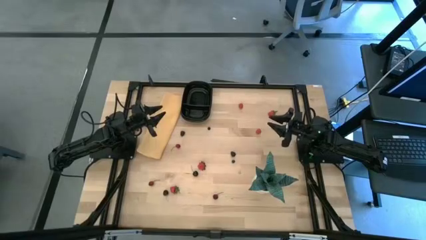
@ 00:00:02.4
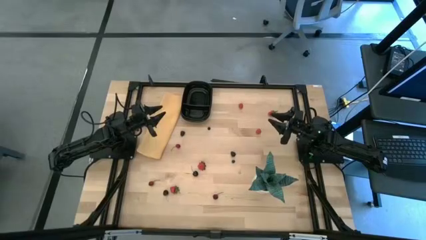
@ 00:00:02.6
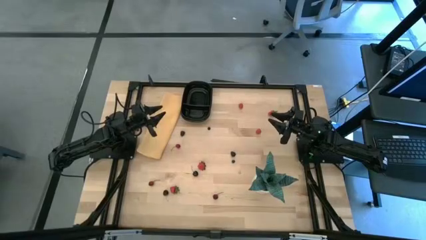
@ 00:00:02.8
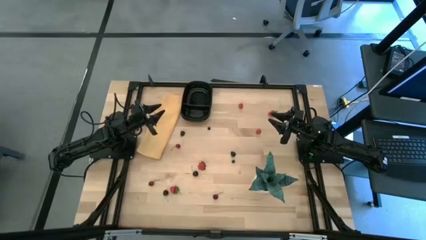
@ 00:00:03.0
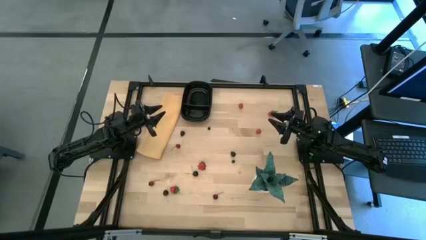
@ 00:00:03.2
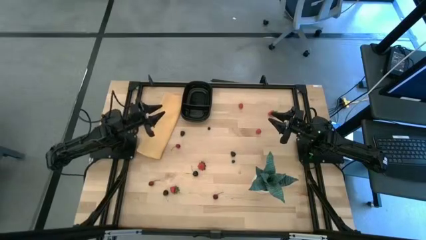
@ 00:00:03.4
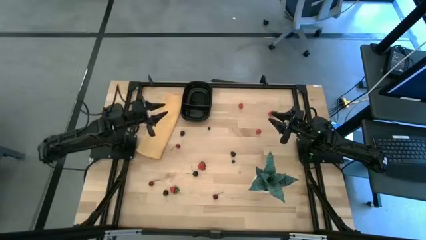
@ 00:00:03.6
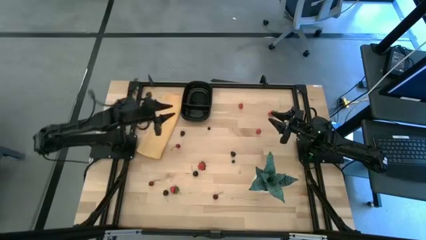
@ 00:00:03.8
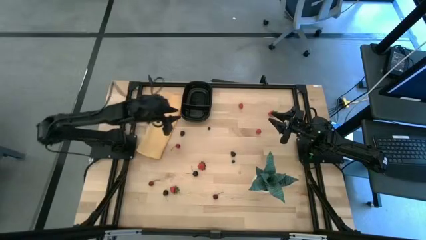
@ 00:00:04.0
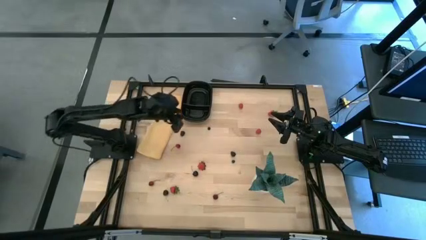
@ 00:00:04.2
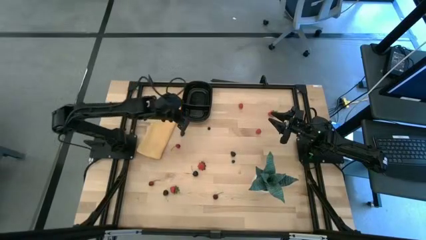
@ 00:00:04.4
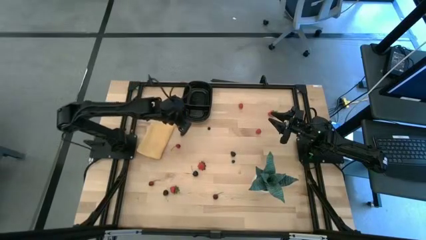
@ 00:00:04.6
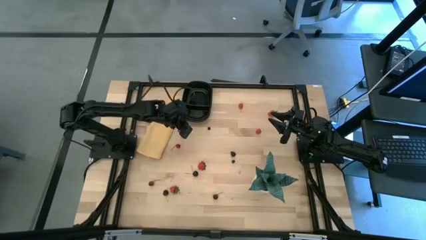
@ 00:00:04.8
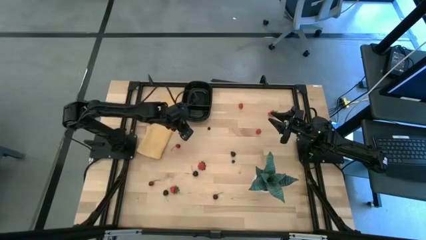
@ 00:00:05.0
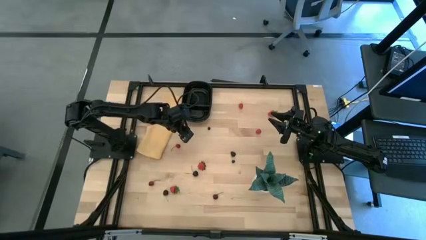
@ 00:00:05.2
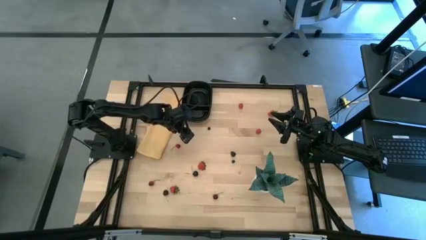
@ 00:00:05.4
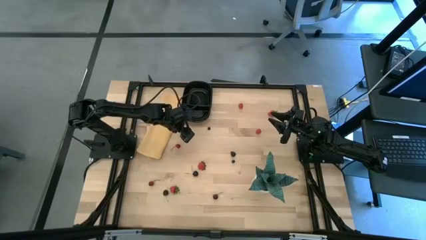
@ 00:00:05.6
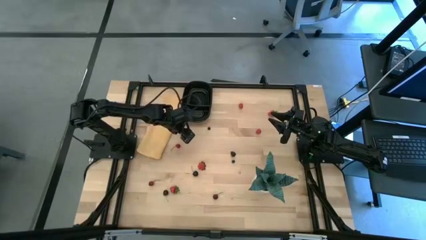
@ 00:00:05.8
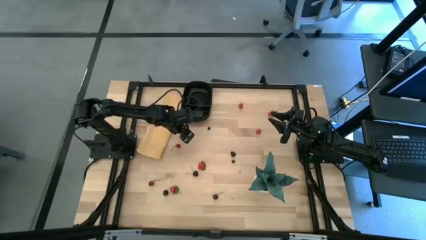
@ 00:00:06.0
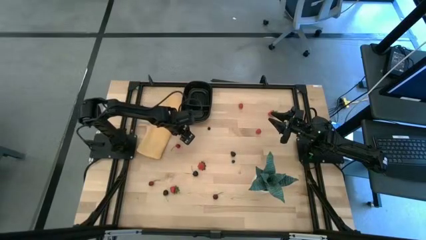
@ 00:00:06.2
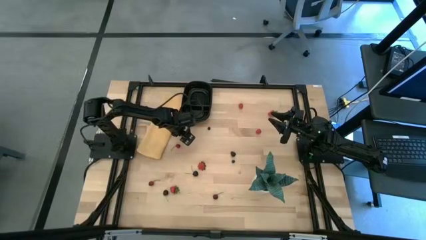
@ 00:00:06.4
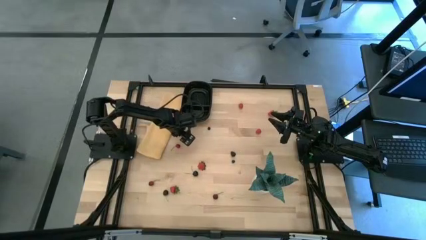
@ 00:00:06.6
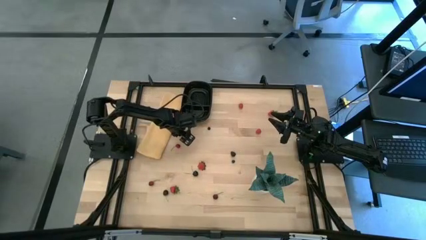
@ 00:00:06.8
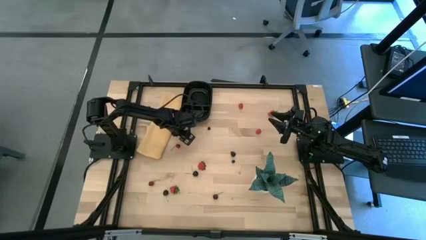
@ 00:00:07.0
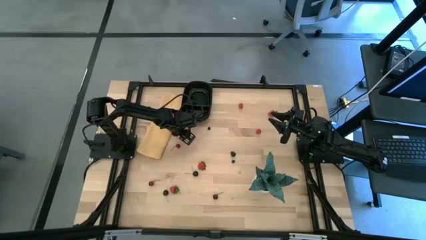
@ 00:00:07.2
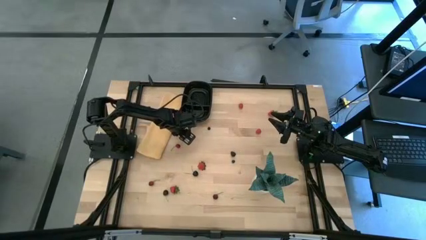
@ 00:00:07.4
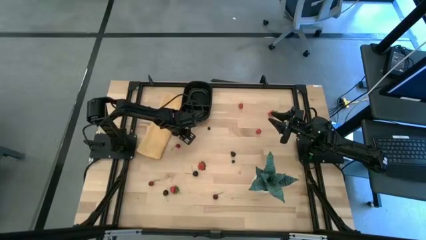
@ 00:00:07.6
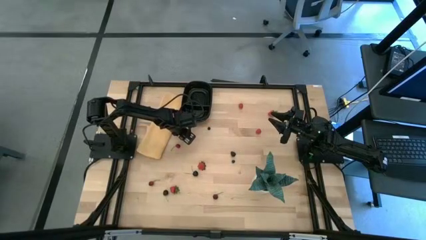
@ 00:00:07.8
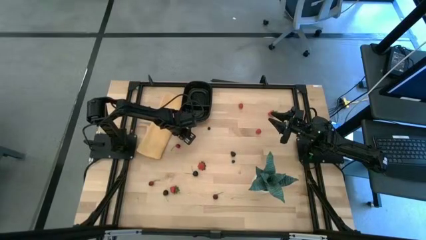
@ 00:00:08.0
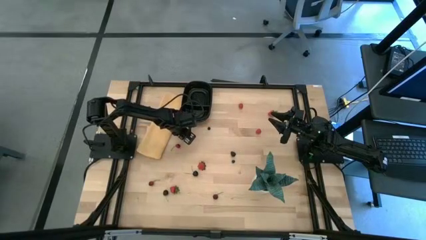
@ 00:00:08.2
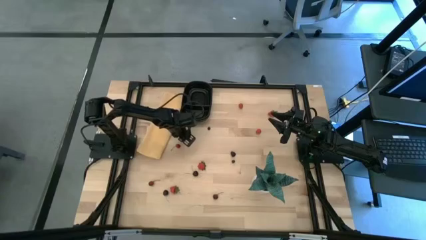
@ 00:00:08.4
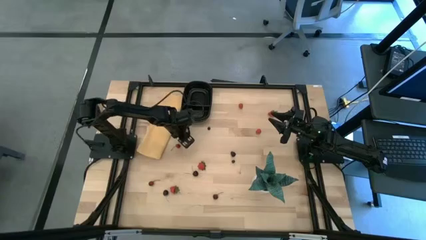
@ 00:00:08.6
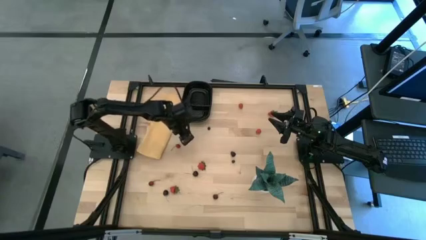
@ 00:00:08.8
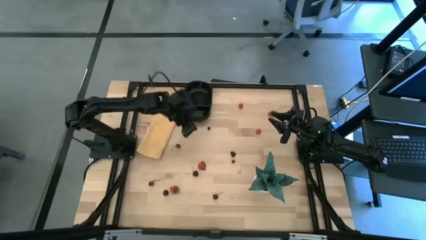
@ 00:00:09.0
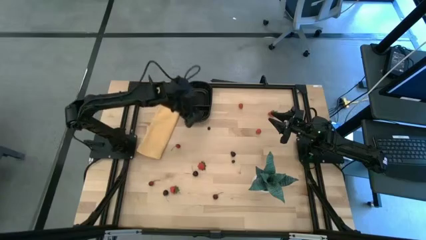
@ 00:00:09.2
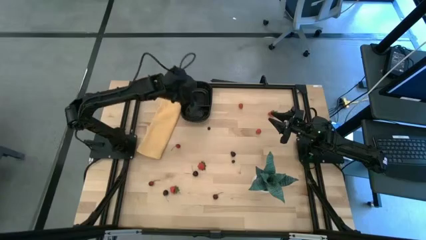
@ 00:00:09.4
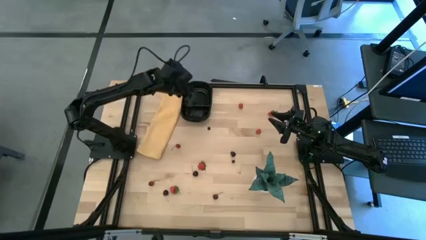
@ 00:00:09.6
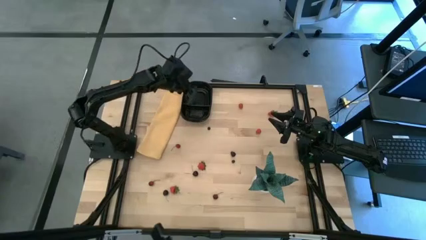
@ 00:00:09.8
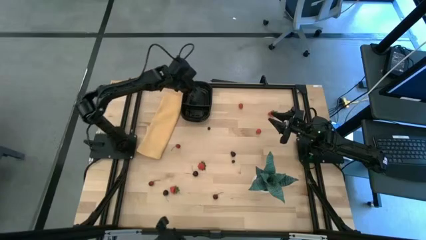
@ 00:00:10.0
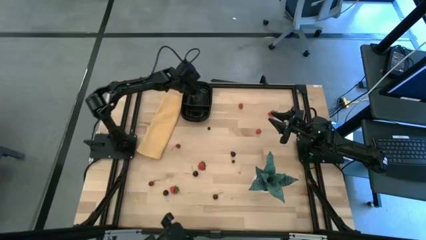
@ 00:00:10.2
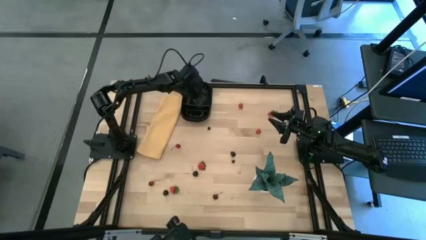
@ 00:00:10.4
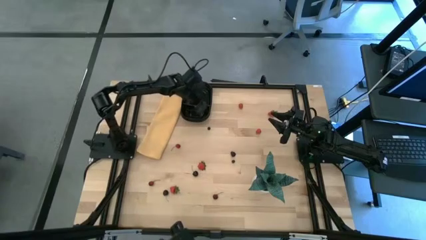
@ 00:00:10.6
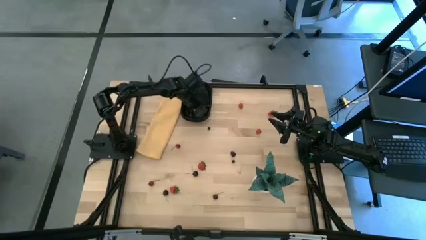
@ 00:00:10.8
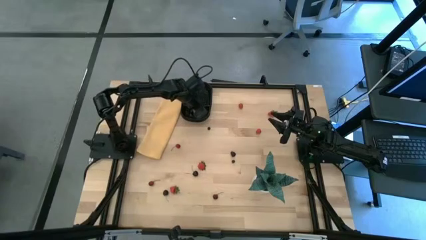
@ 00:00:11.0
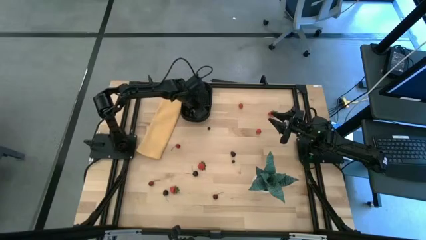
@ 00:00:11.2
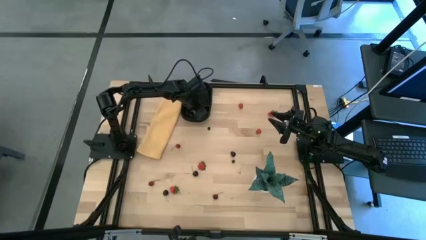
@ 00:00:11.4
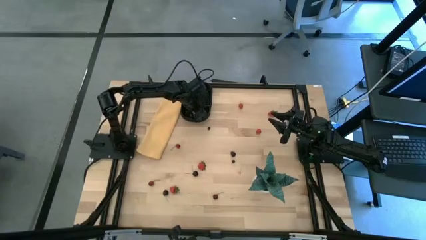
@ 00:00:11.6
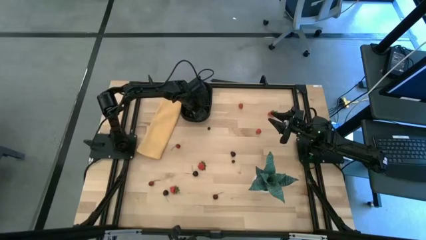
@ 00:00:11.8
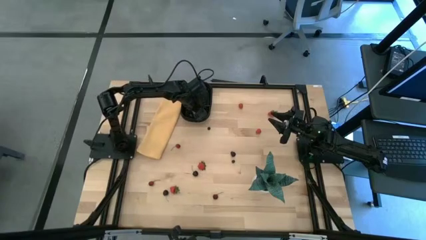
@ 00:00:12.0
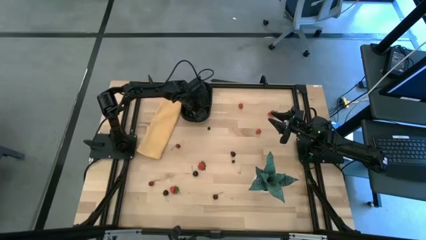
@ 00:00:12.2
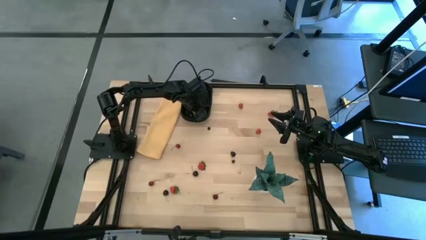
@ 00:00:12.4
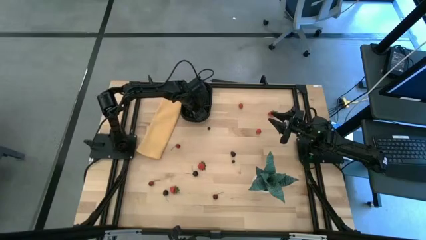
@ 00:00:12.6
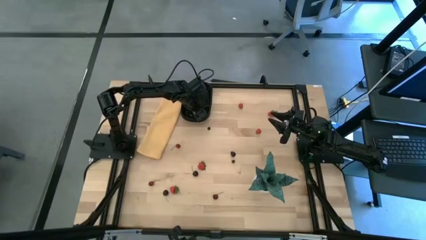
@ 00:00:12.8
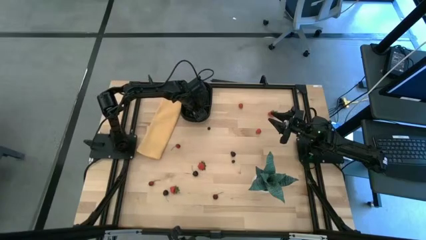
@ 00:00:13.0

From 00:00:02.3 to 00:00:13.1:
Task: Pick and placing Produce into tupperware
Put the top blackberry into the black bin
